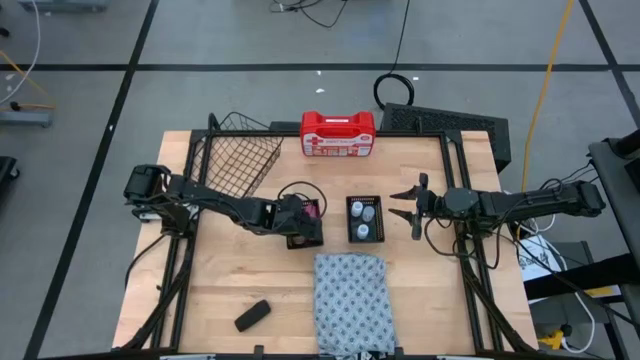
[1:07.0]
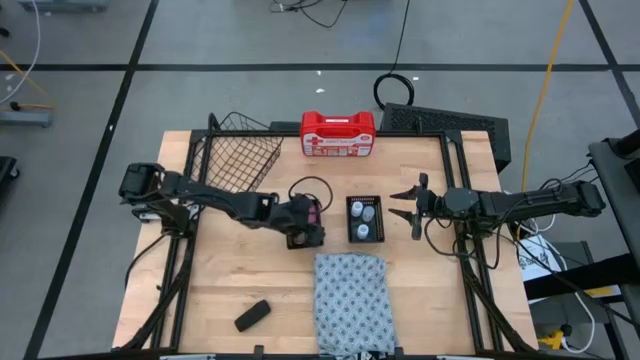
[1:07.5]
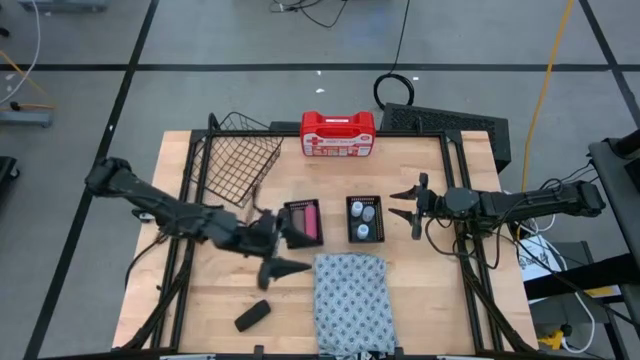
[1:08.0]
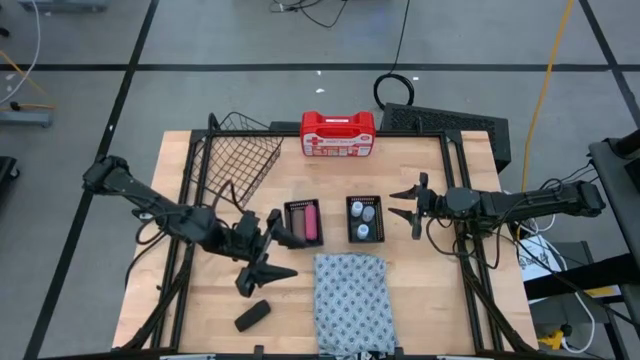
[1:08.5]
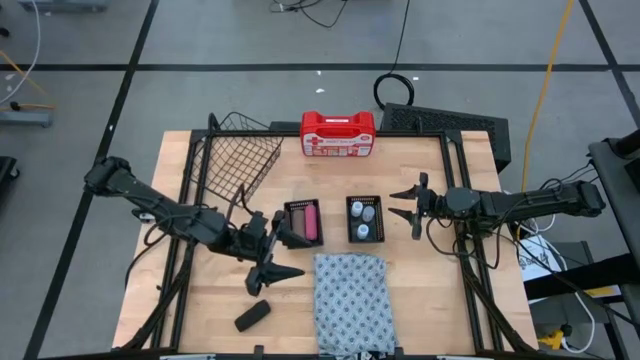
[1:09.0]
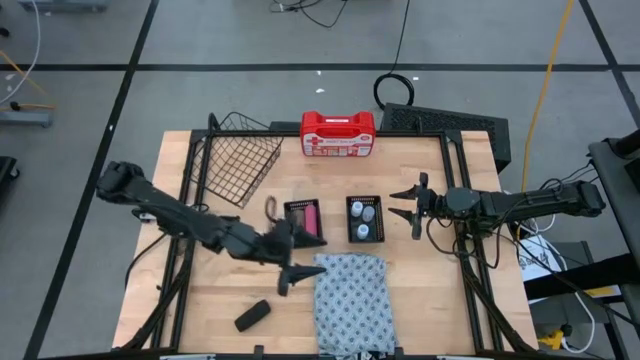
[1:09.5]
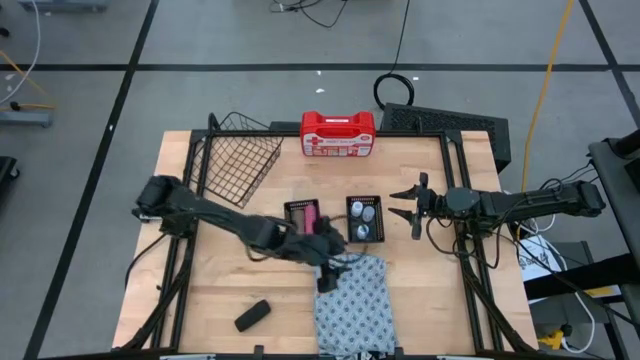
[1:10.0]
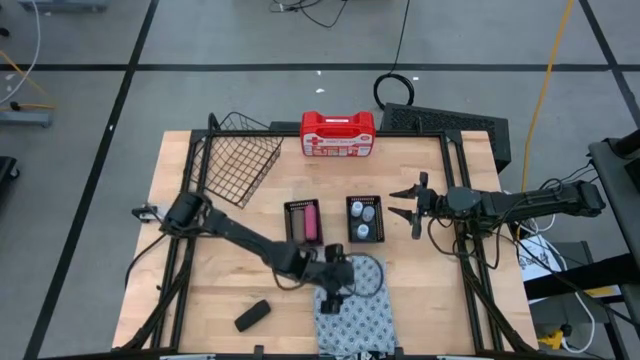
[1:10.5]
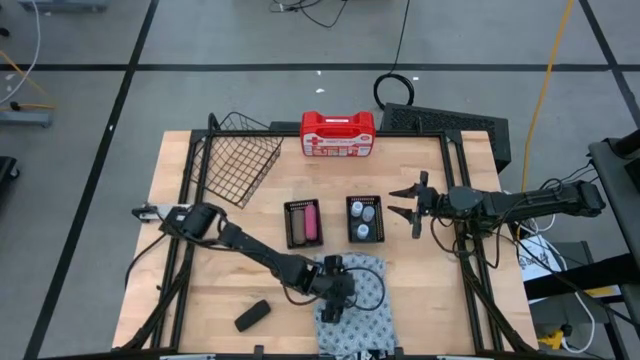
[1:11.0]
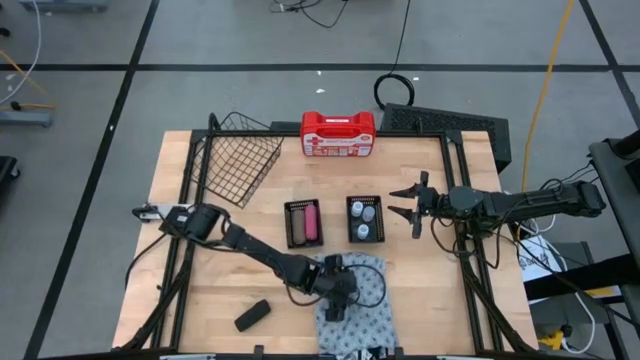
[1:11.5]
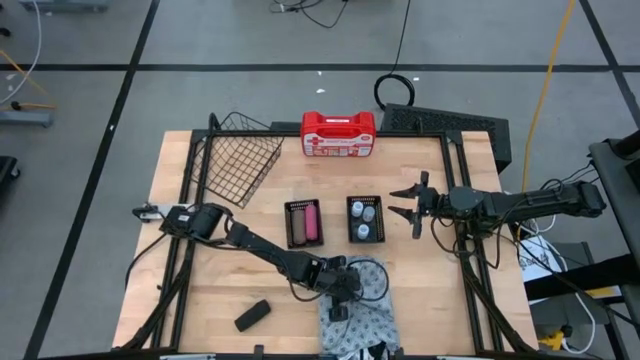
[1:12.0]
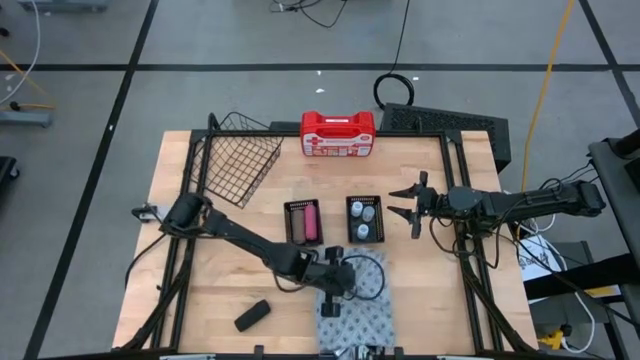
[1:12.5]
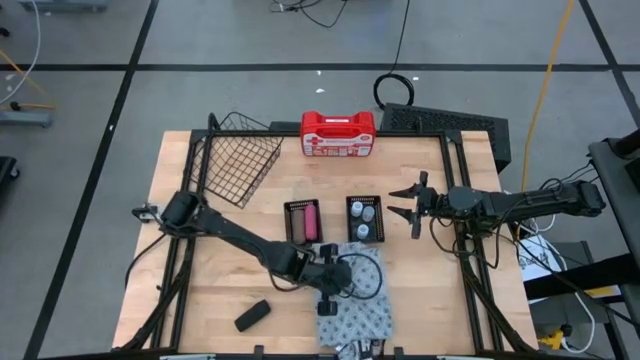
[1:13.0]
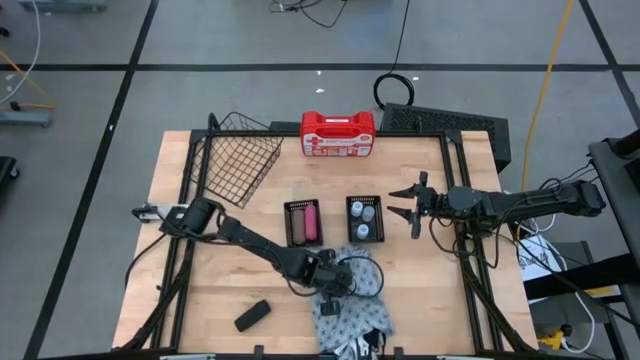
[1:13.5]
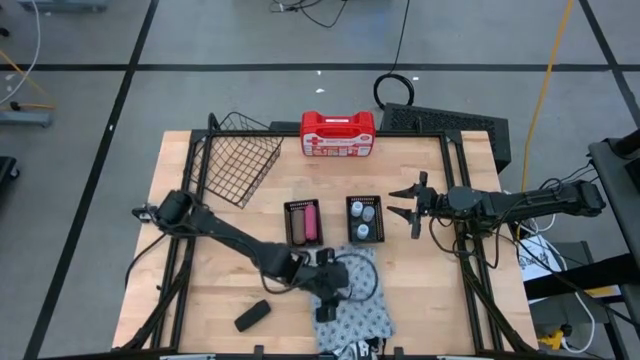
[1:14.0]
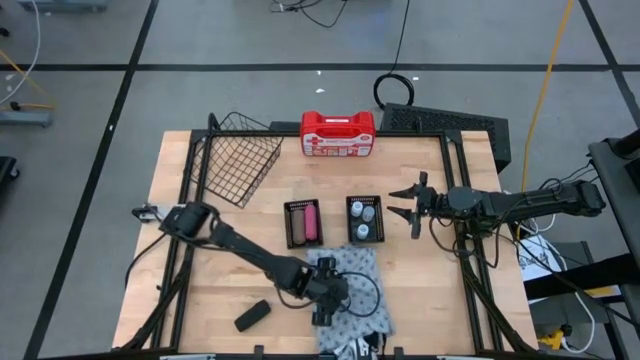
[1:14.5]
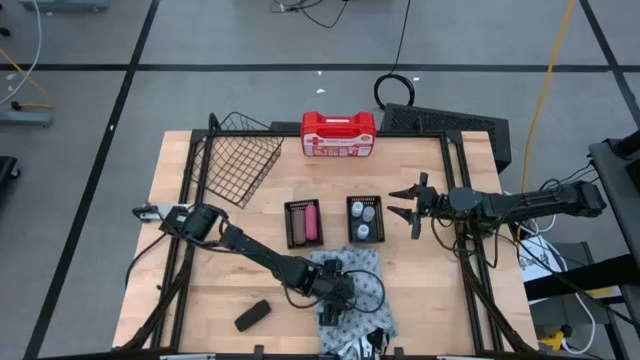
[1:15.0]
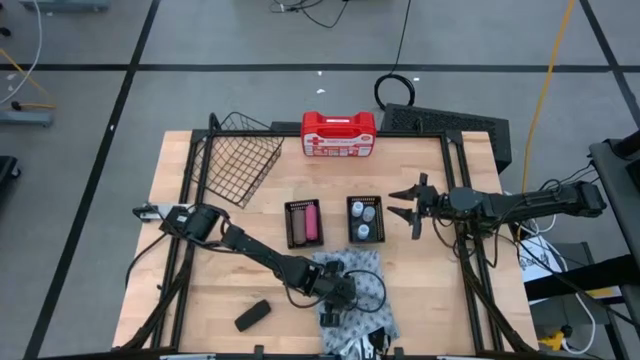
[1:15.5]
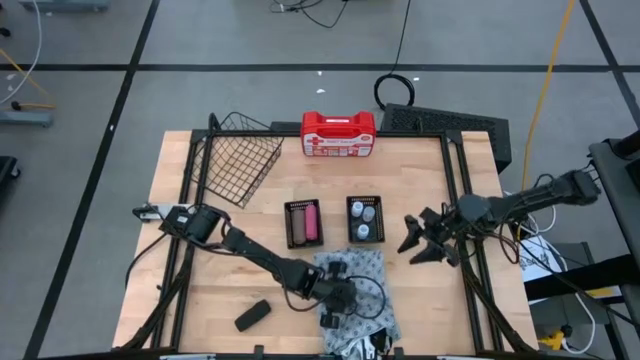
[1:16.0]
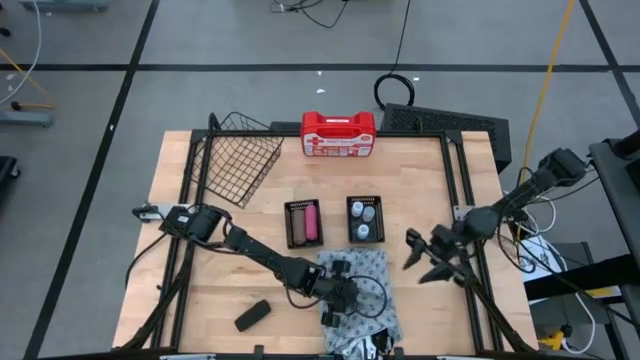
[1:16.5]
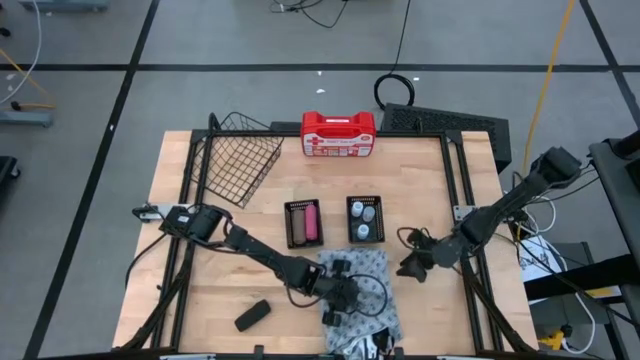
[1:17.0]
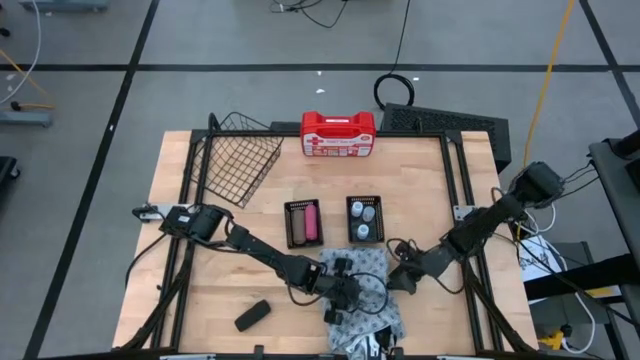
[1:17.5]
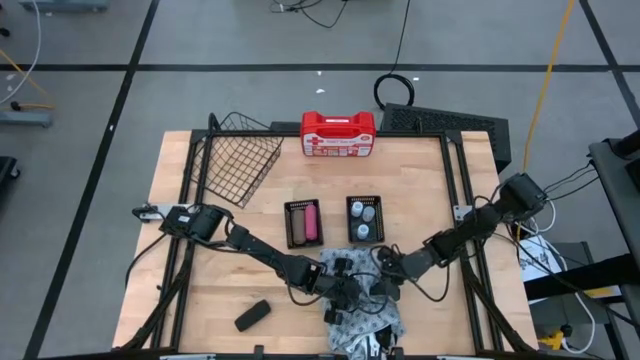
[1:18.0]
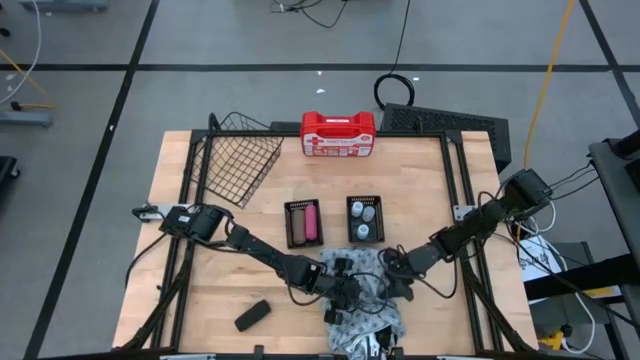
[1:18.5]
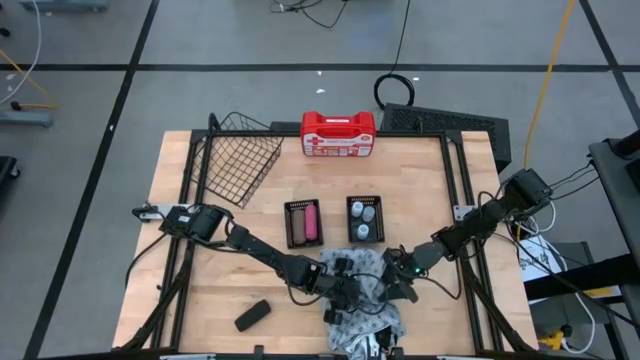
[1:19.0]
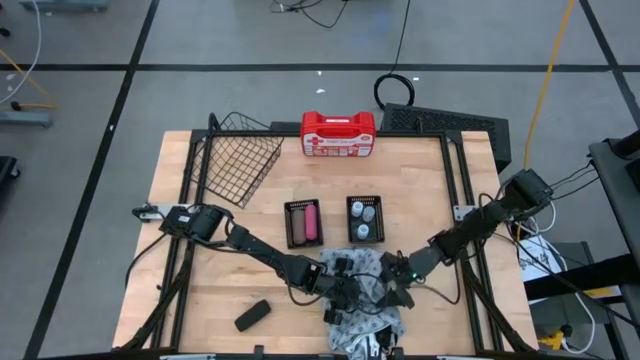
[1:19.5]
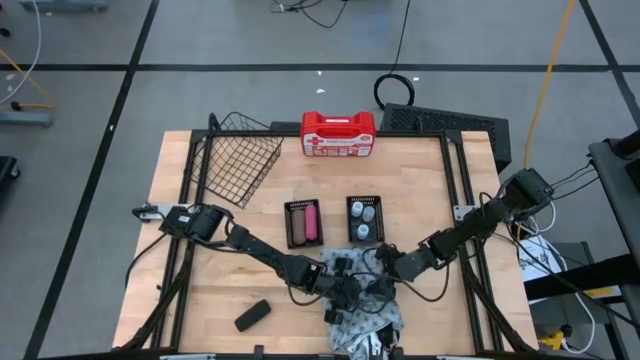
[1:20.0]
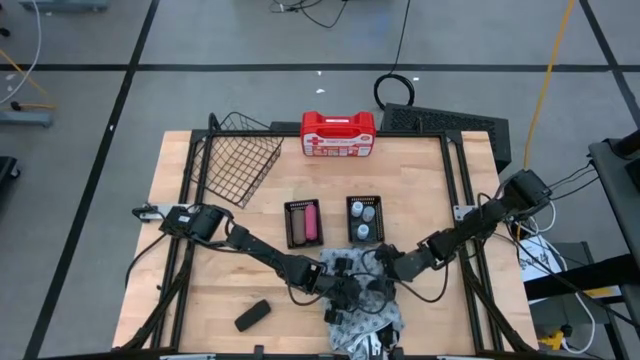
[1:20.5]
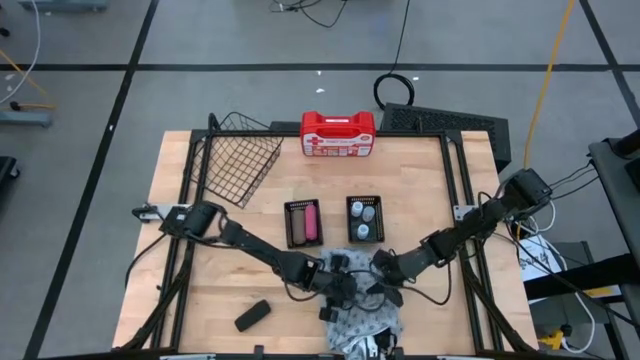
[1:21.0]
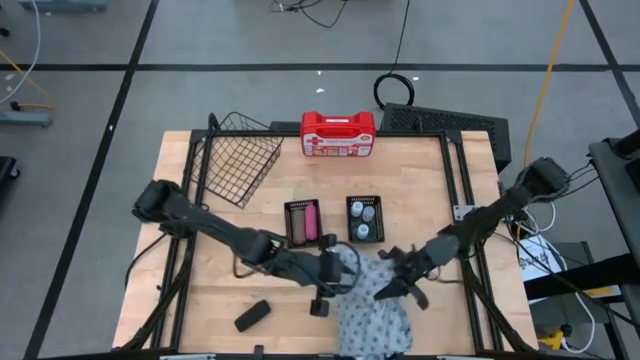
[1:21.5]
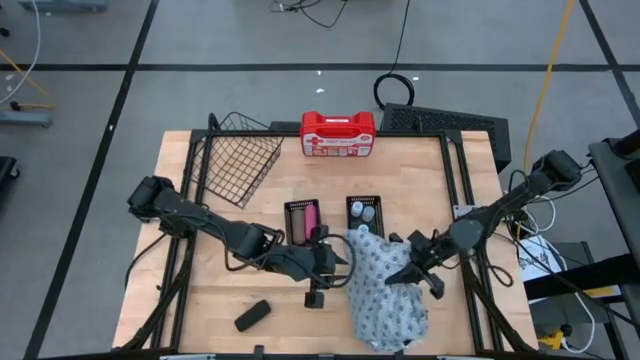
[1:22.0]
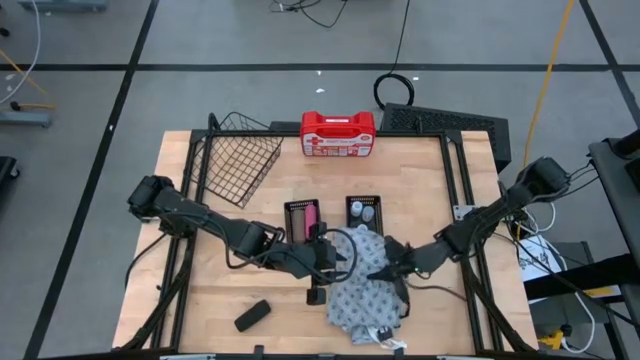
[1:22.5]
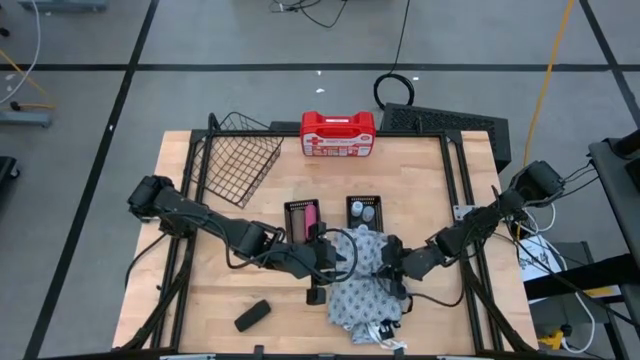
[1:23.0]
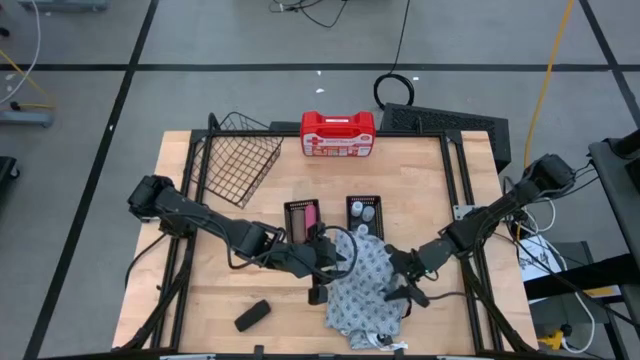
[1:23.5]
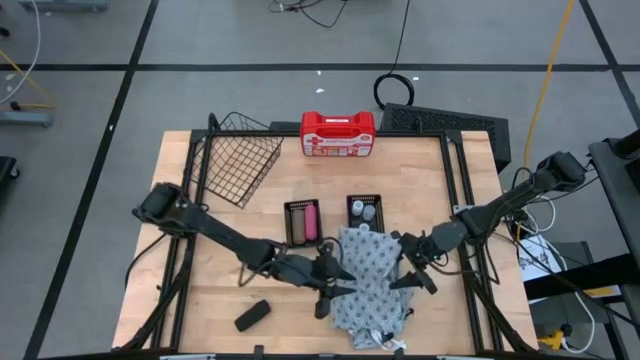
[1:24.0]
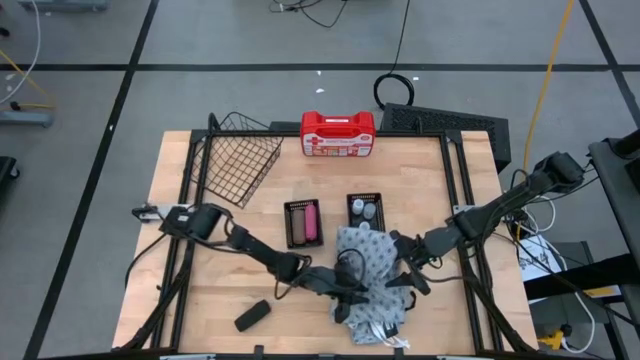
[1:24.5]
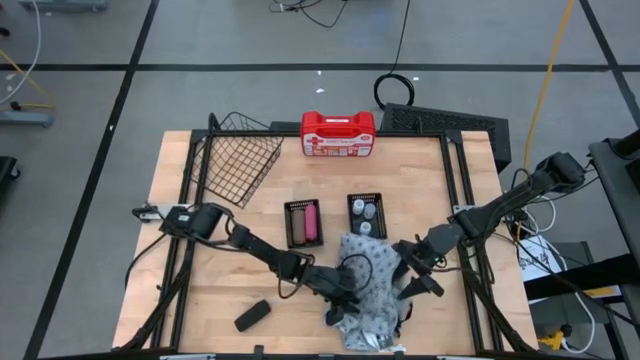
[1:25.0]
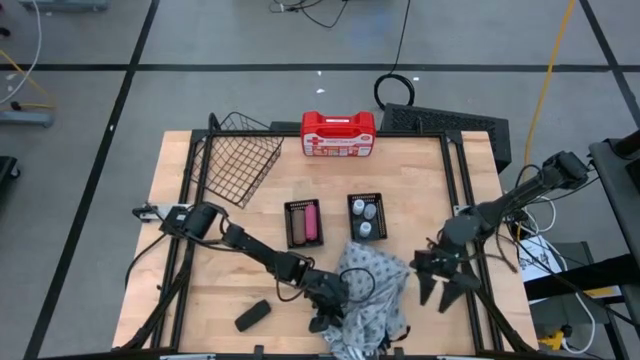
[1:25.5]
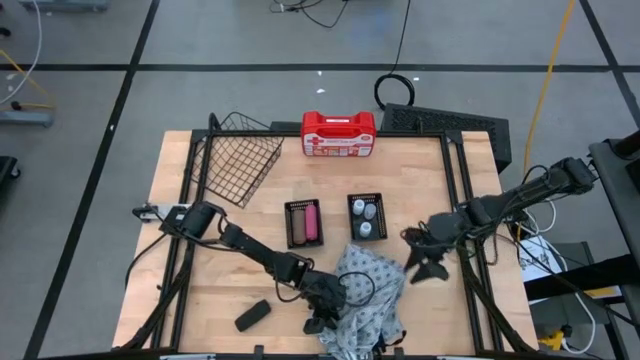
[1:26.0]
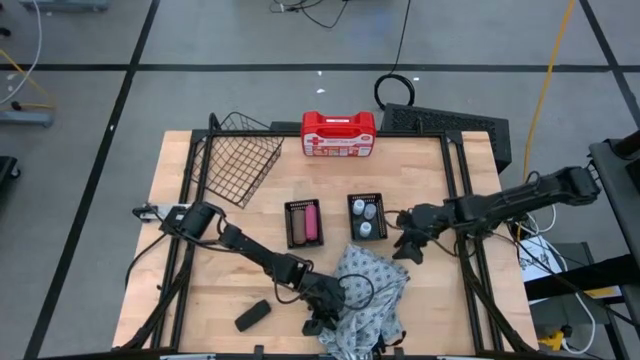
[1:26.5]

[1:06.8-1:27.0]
Task: Pick & Place Medicine items
Put the blue patient gown into the wire basket

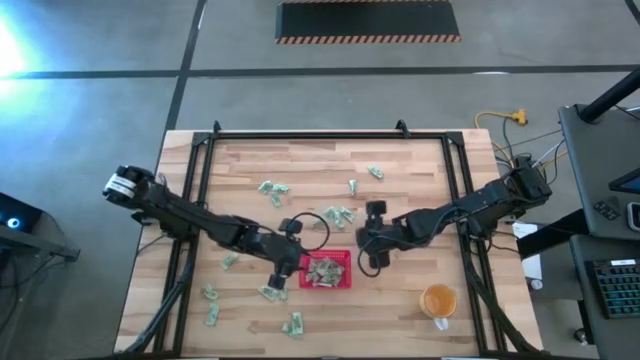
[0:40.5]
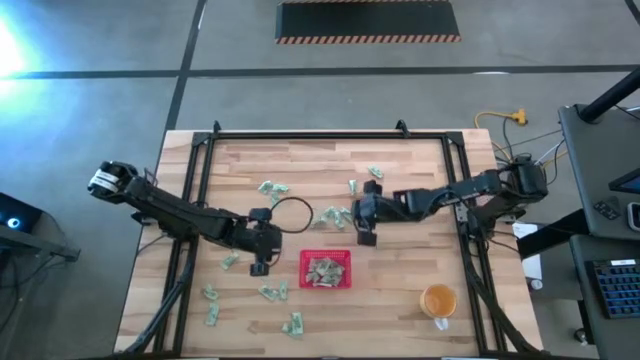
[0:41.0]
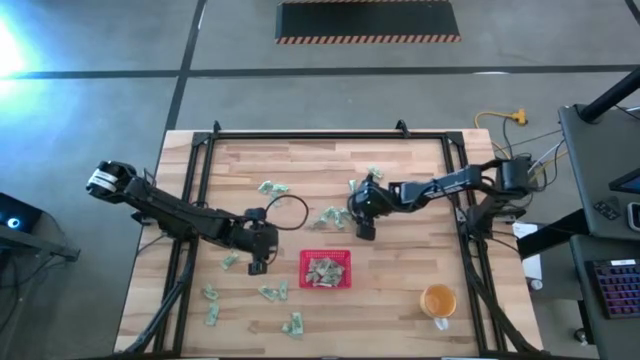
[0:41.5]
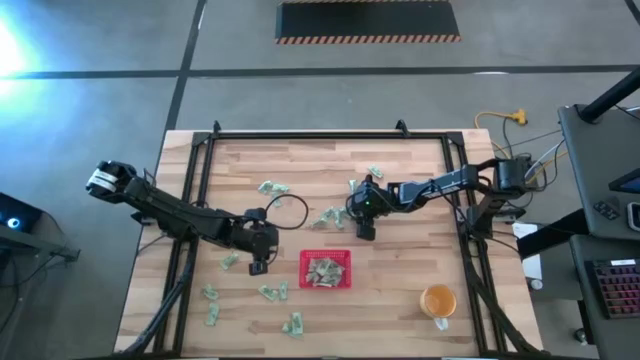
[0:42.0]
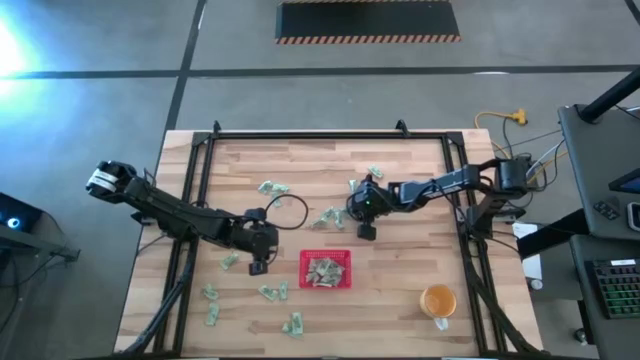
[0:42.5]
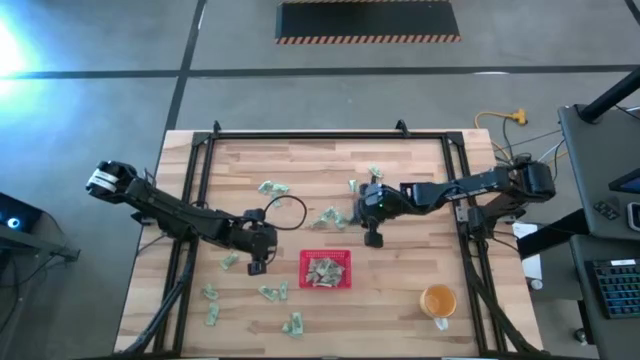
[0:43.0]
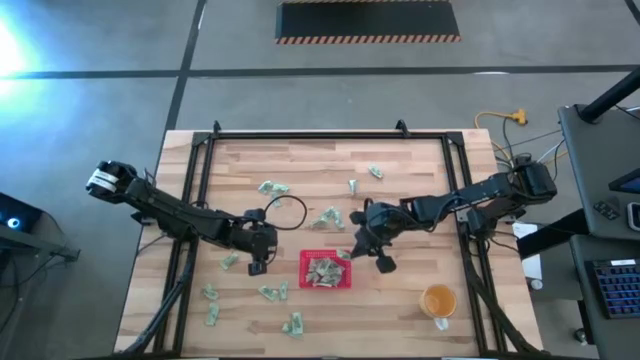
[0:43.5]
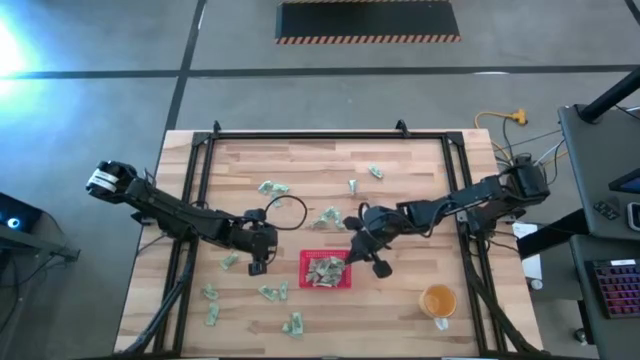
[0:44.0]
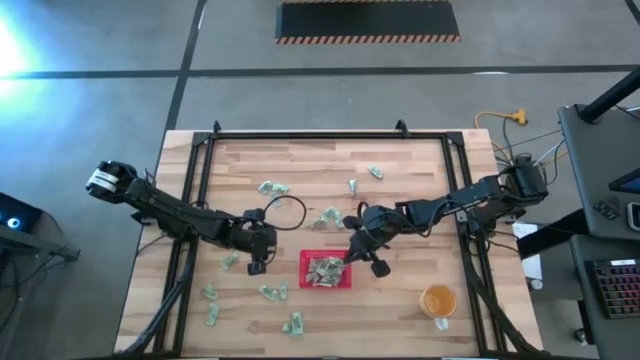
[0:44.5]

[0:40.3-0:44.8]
Task: Pick and place Stevia / Truvia into bins
Put the white stevia packet into the red bin
